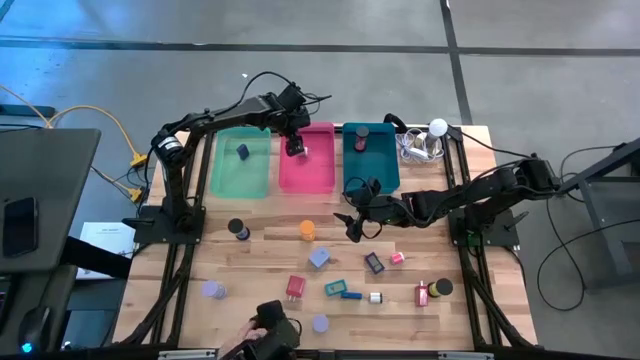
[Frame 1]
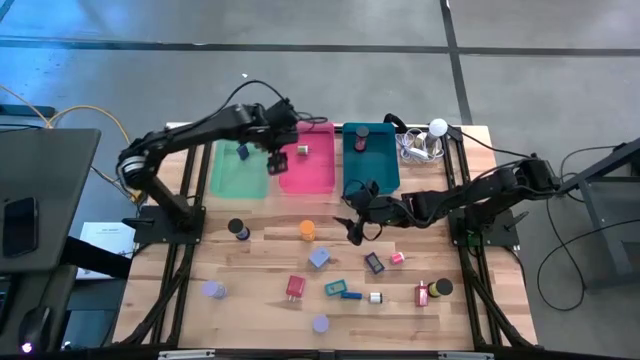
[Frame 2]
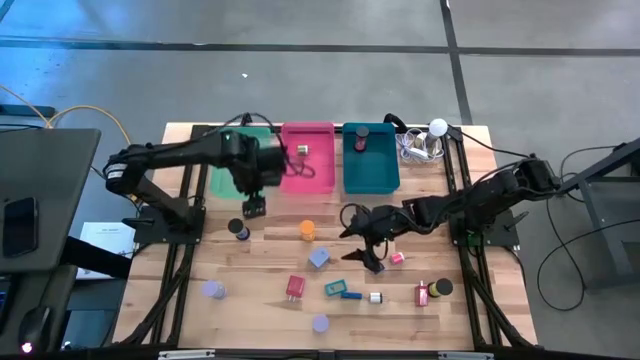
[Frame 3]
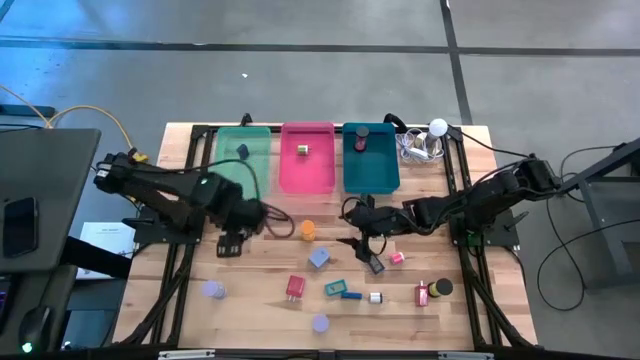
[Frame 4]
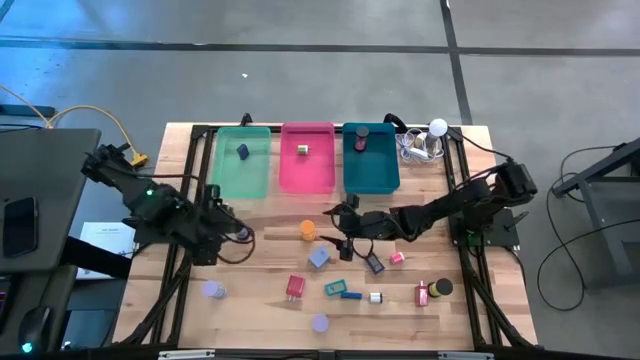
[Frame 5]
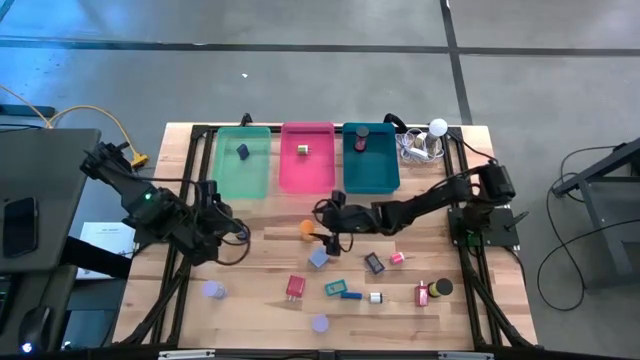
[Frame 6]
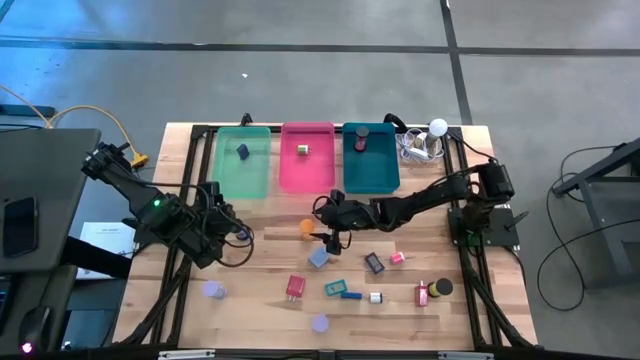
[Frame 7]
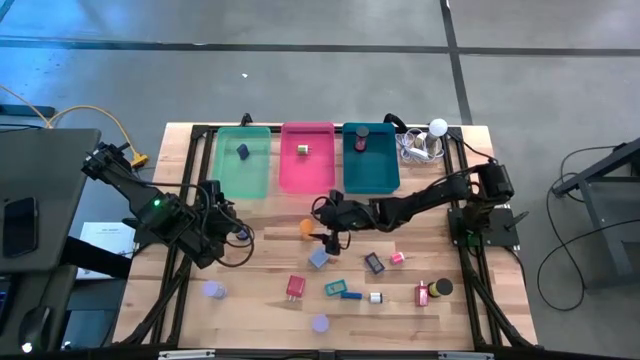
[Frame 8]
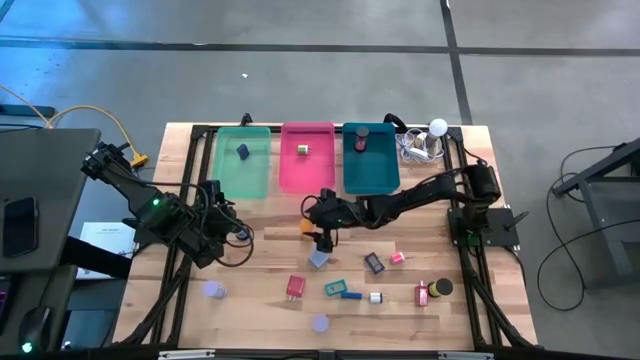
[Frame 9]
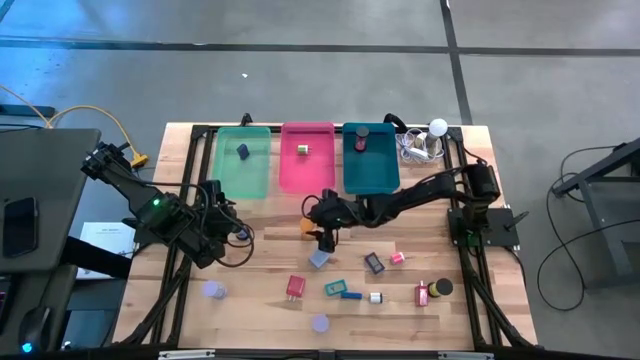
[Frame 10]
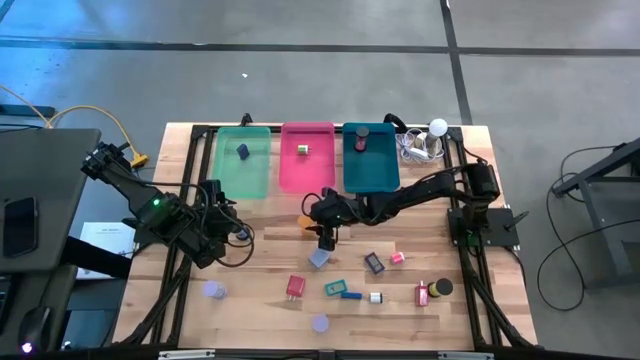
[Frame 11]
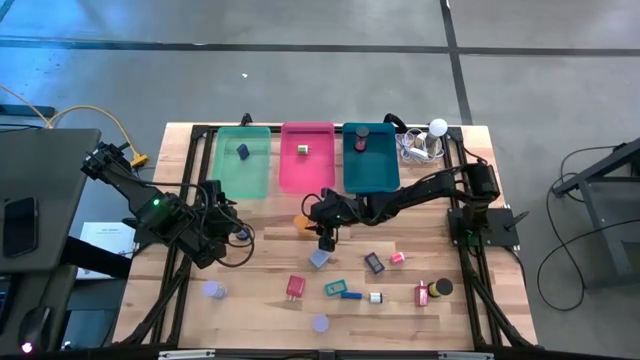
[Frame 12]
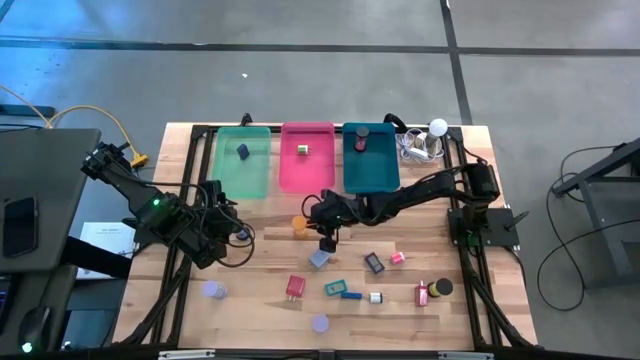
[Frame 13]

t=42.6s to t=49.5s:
Task: Pick & Place Office items
Put the yellow hourglass into the blue bin

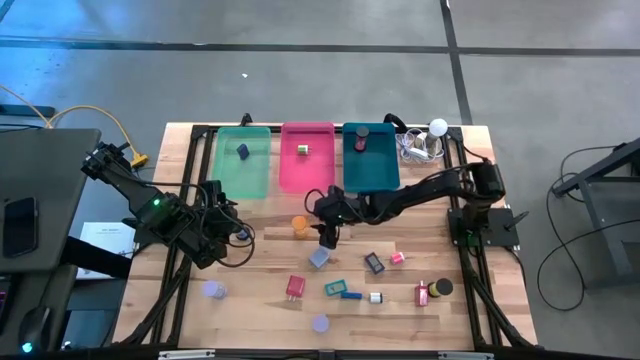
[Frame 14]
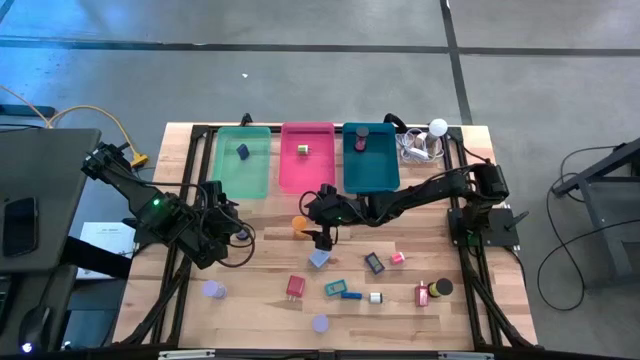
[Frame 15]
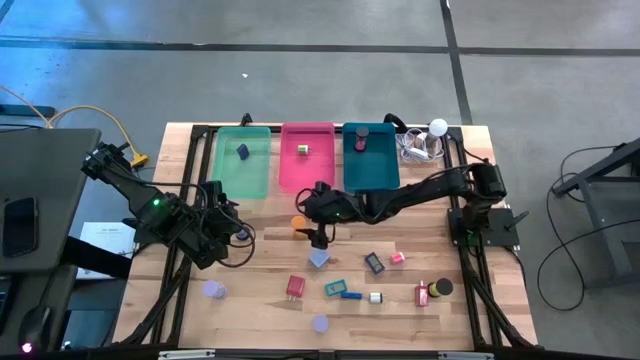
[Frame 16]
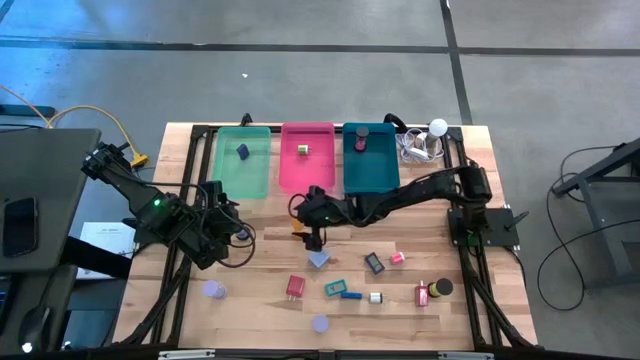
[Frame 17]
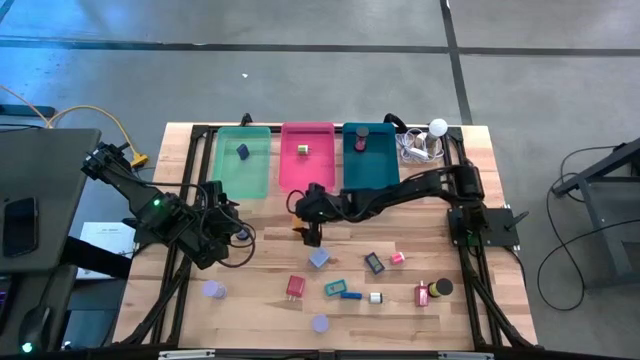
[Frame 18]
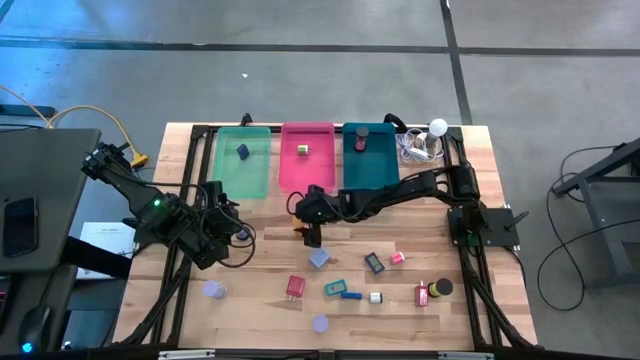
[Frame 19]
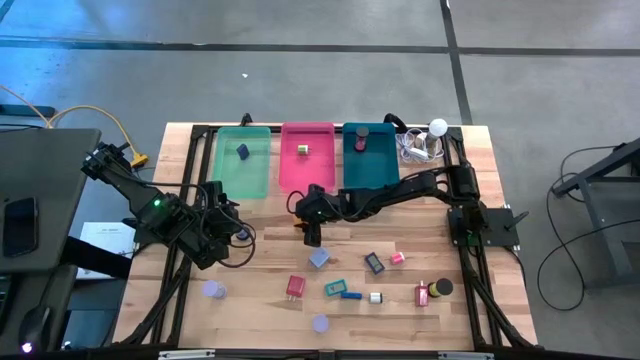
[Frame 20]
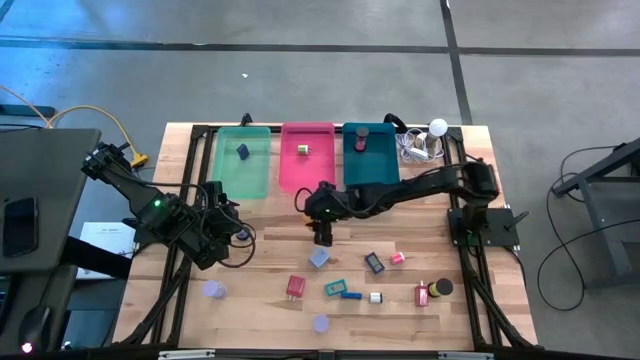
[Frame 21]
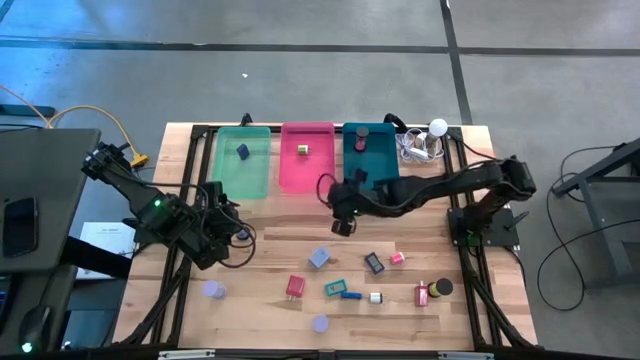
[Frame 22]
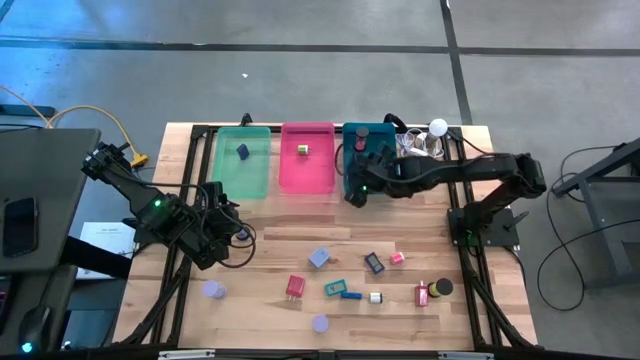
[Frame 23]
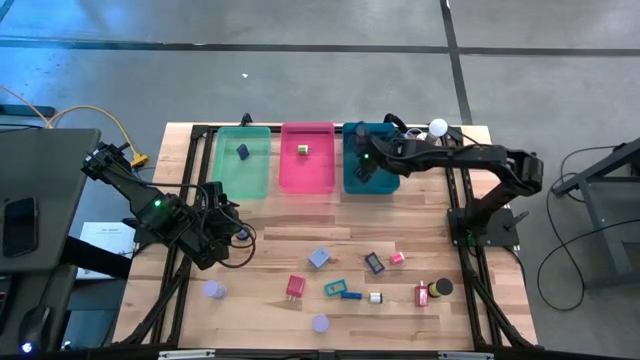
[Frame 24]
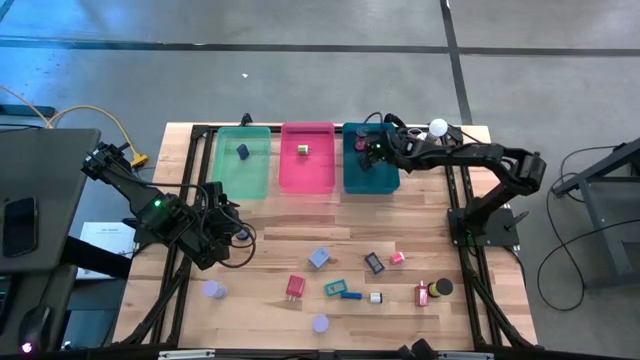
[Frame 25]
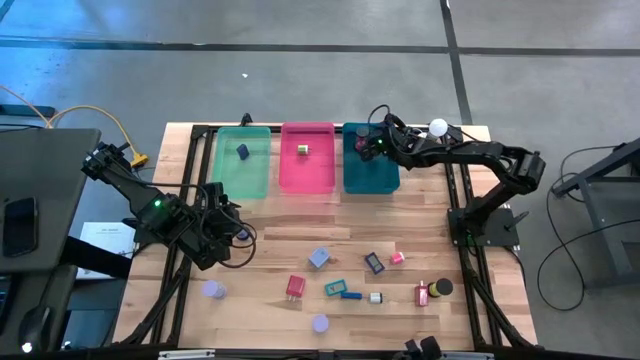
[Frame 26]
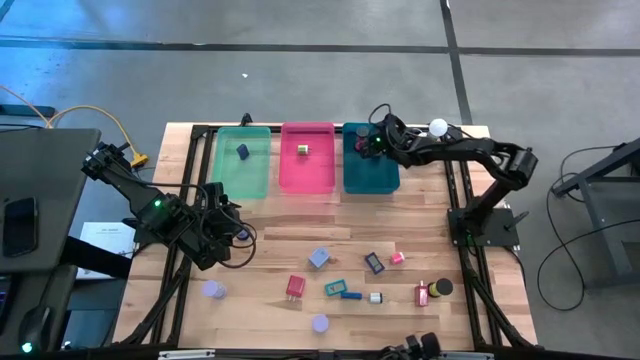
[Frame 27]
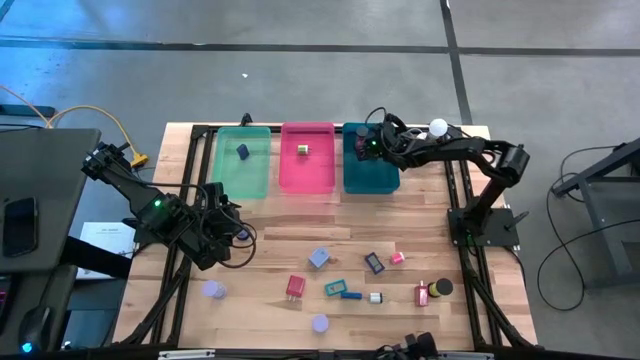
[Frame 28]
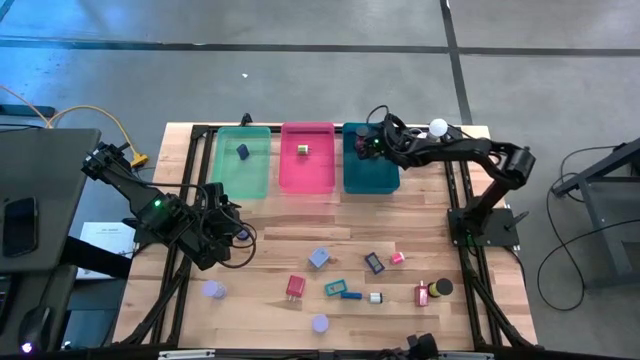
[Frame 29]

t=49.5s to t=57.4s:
Put the yellow hourglass into the blue bin

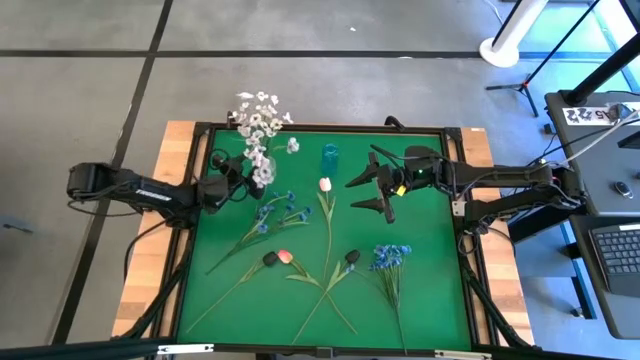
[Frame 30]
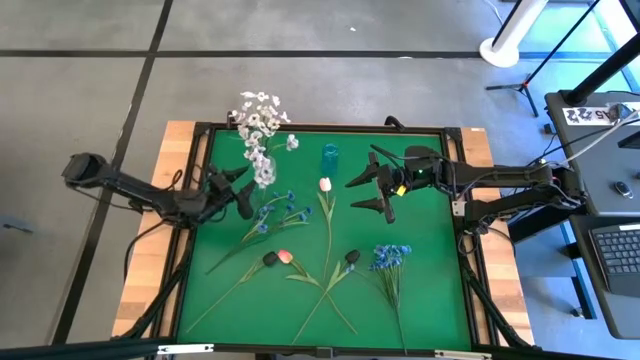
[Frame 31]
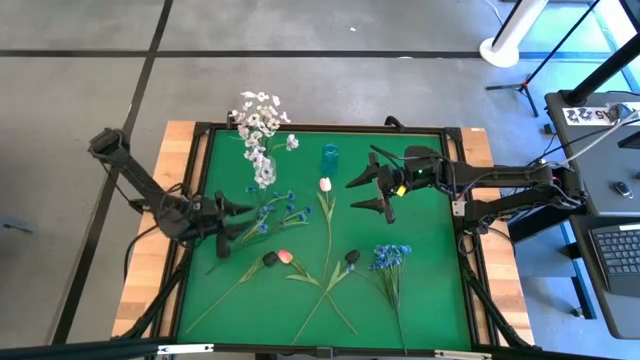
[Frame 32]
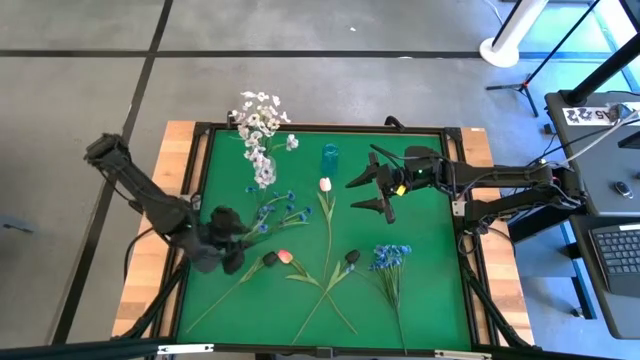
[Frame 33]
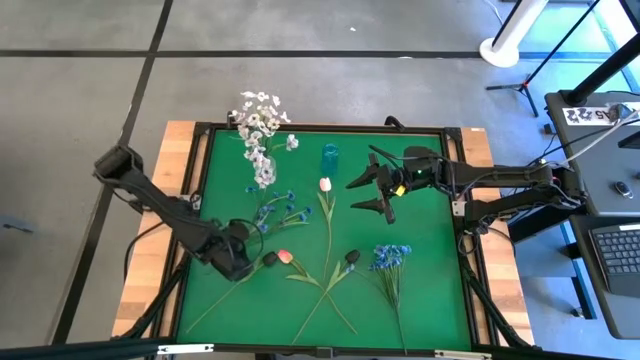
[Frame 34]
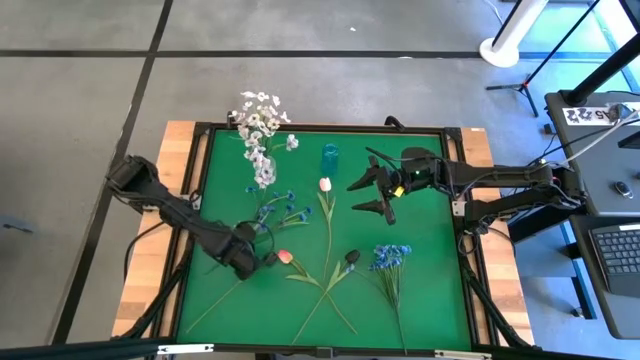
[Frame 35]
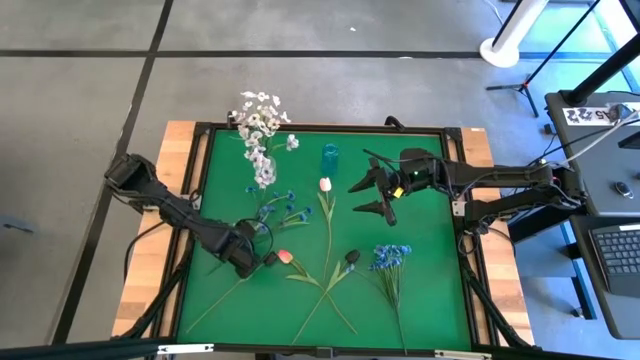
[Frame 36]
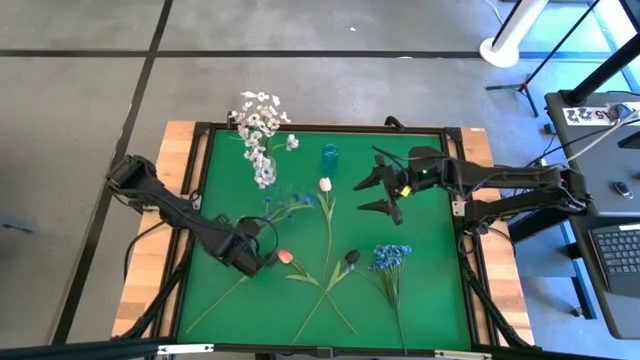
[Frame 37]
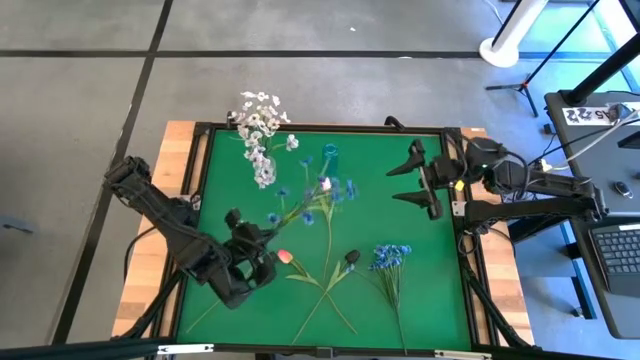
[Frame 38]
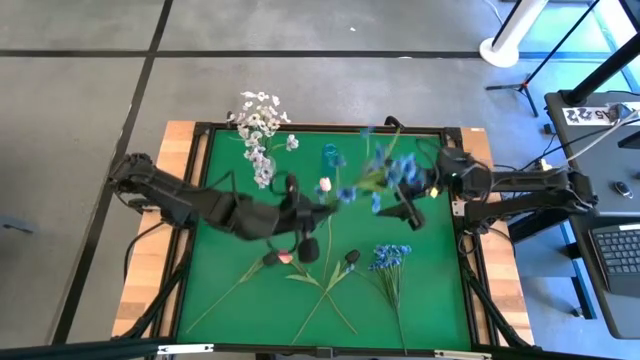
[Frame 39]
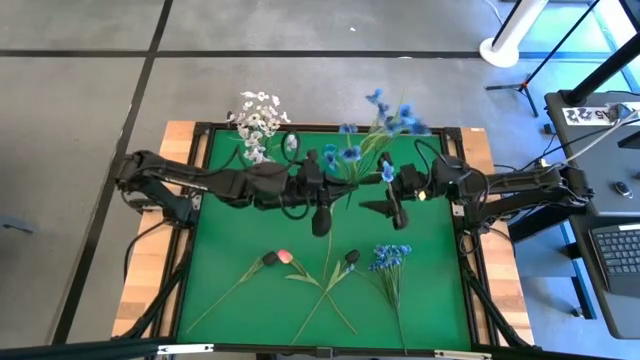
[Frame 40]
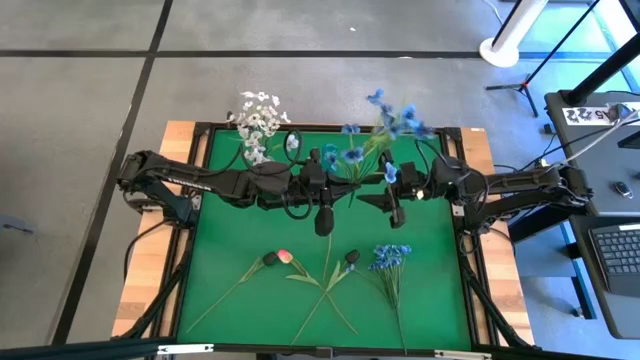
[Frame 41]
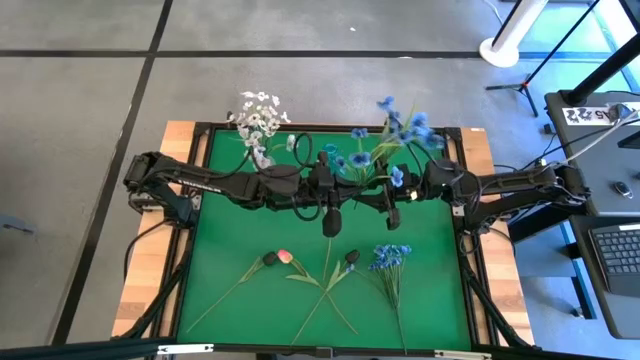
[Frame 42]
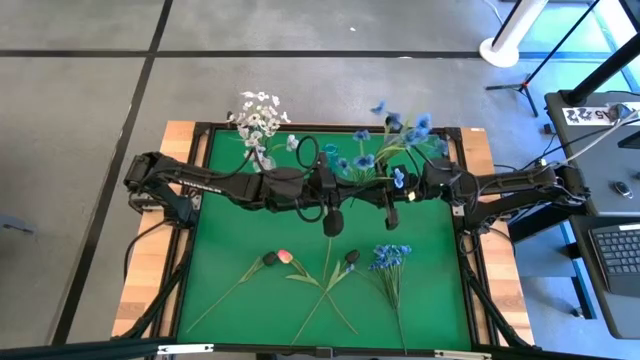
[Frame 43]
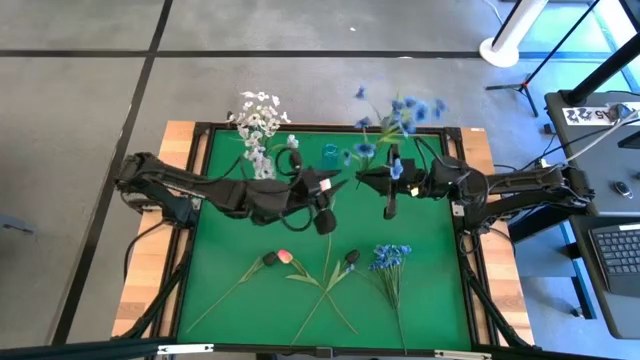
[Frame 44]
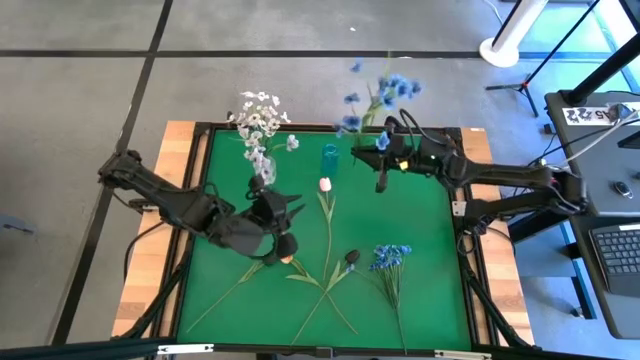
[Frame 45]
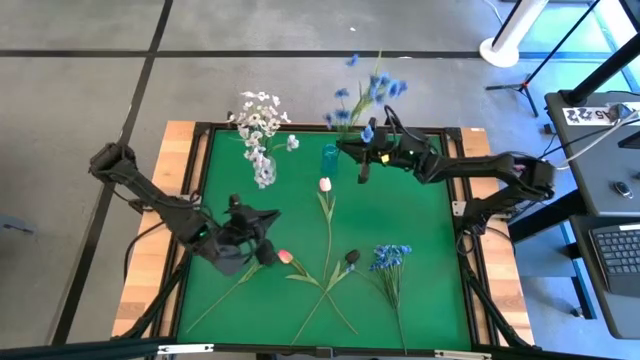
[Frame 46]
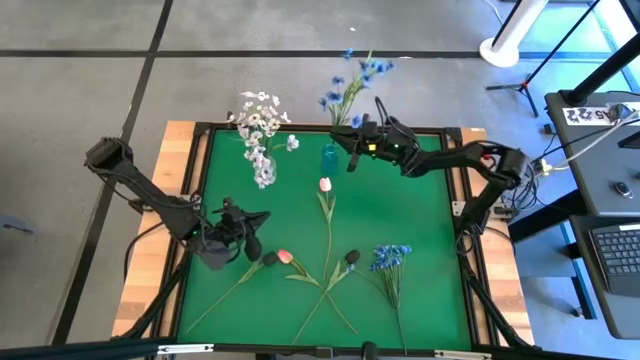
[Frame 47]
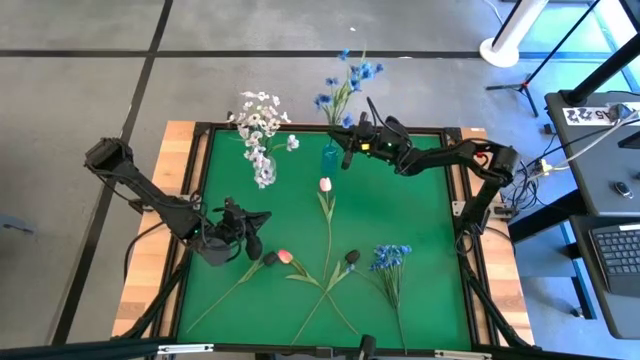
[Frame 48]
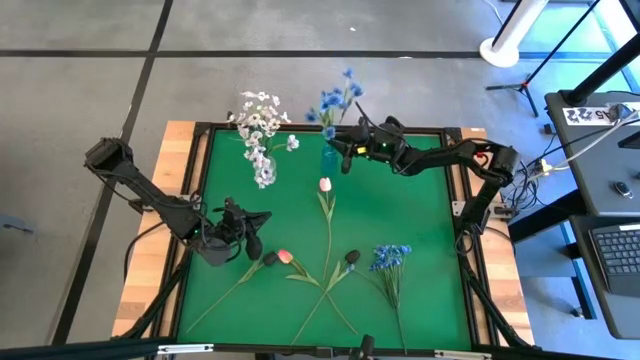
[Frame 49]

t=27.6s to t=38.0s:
Task: Sort flowers into vase by color
Put the top blue flowers into the blue vase
